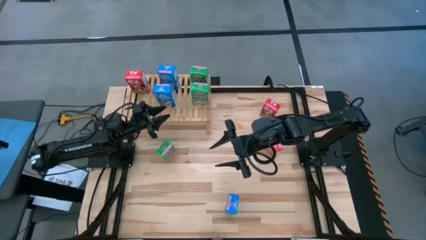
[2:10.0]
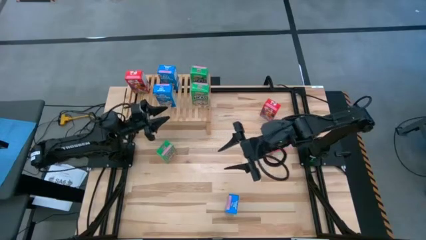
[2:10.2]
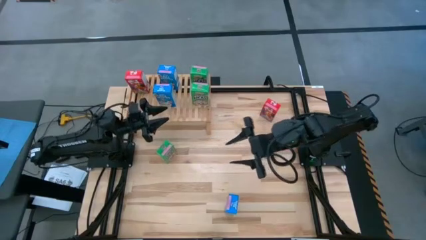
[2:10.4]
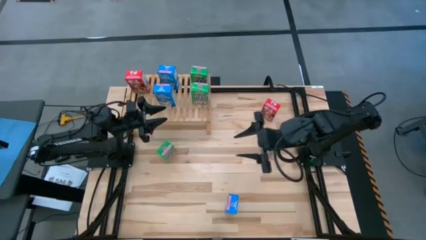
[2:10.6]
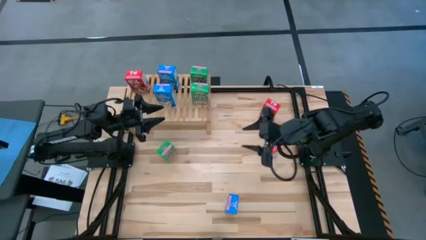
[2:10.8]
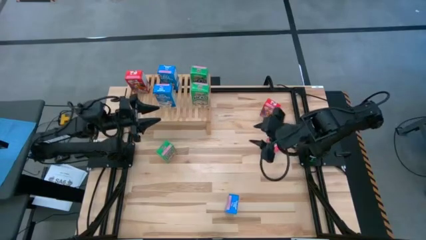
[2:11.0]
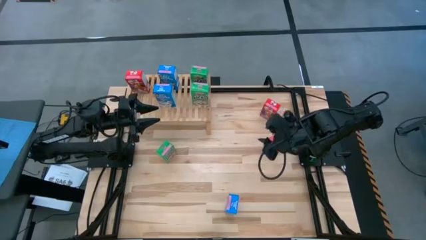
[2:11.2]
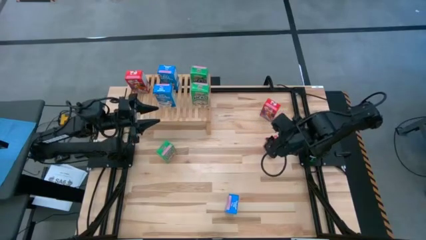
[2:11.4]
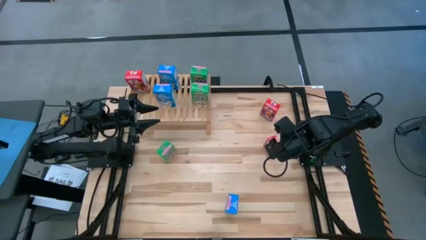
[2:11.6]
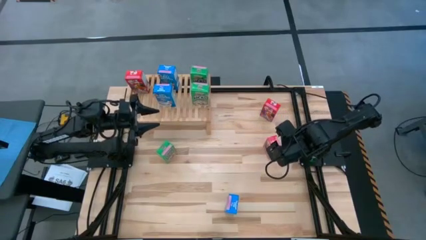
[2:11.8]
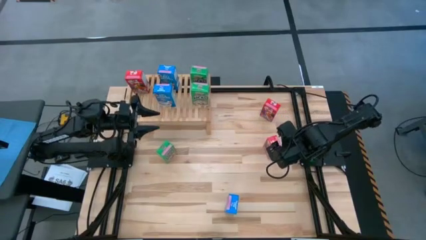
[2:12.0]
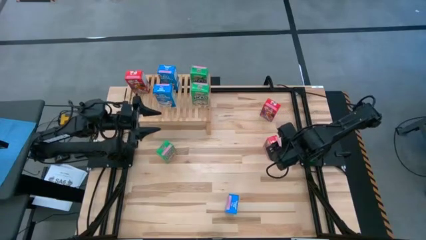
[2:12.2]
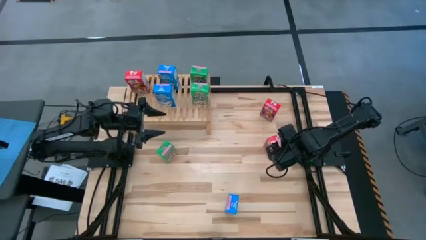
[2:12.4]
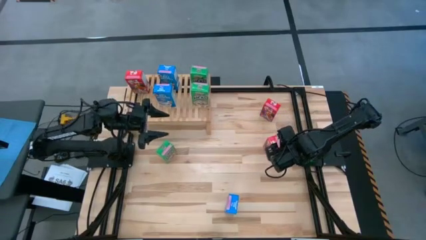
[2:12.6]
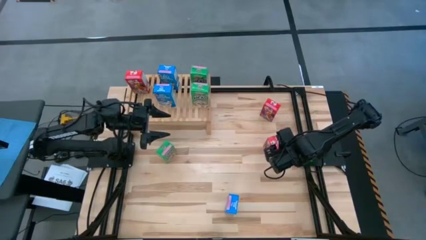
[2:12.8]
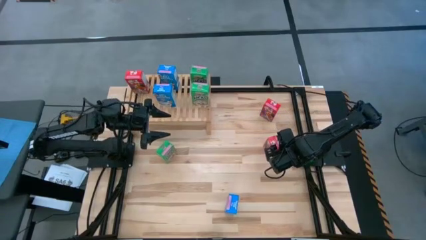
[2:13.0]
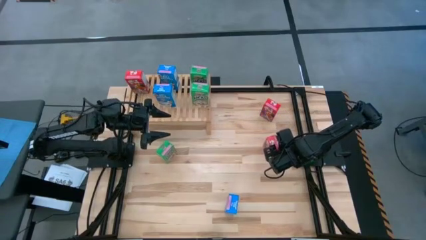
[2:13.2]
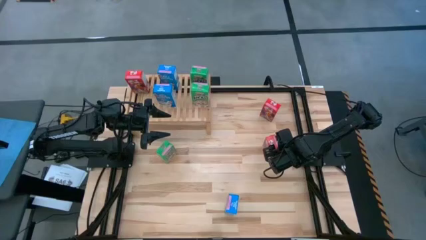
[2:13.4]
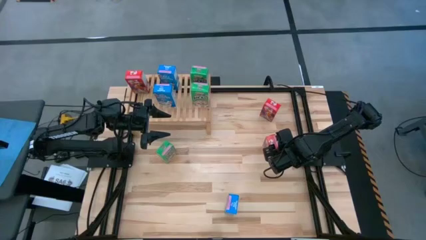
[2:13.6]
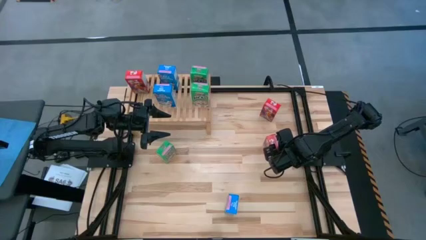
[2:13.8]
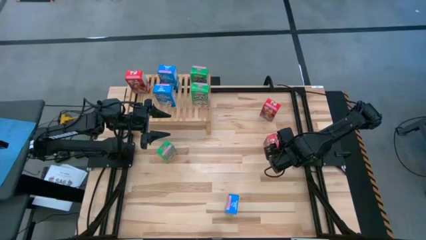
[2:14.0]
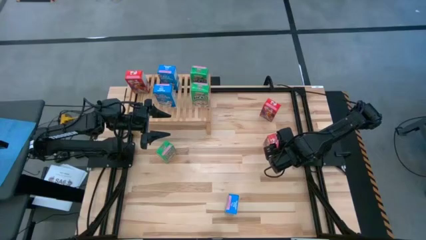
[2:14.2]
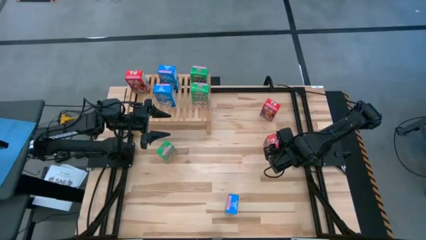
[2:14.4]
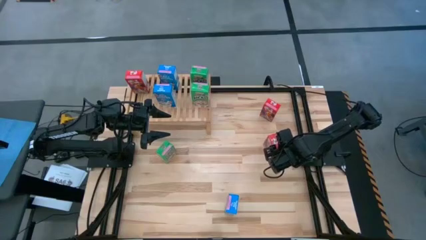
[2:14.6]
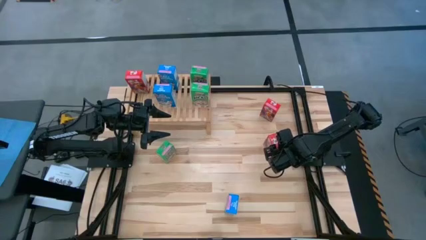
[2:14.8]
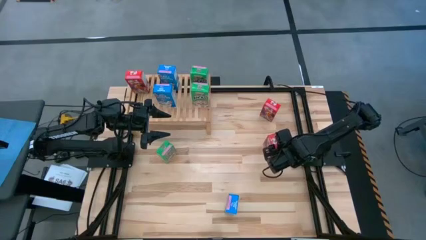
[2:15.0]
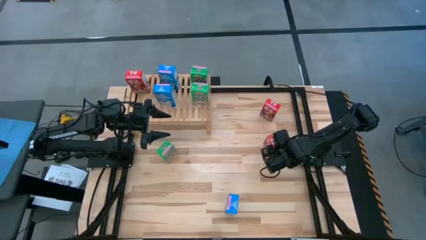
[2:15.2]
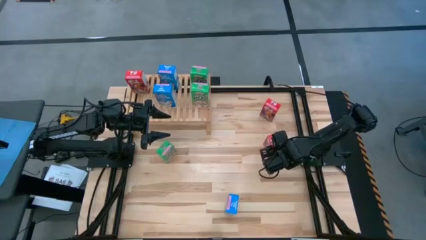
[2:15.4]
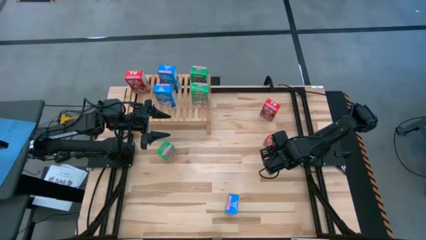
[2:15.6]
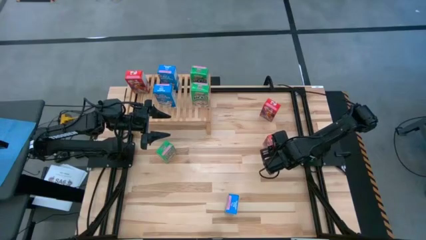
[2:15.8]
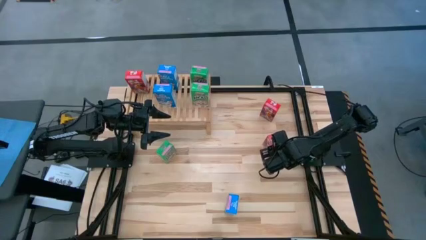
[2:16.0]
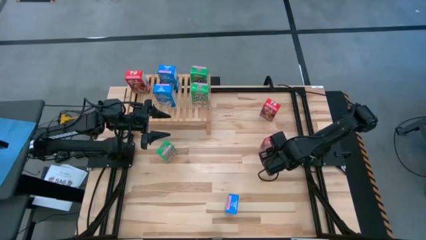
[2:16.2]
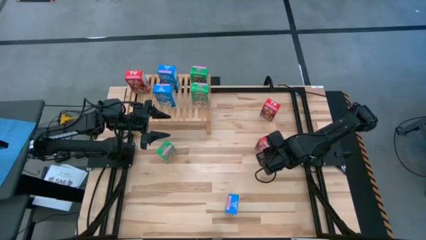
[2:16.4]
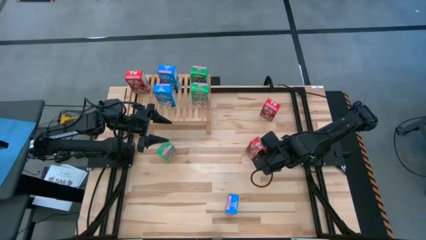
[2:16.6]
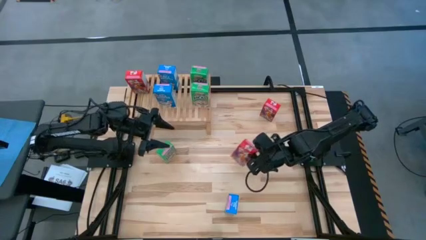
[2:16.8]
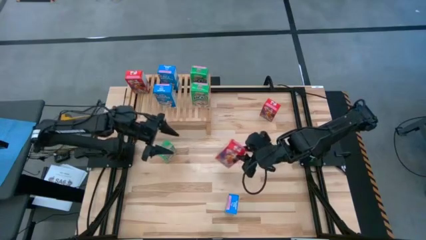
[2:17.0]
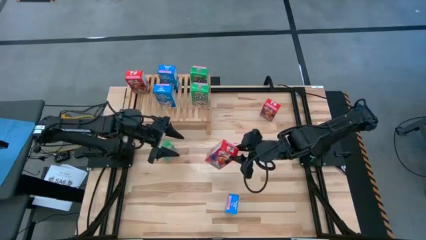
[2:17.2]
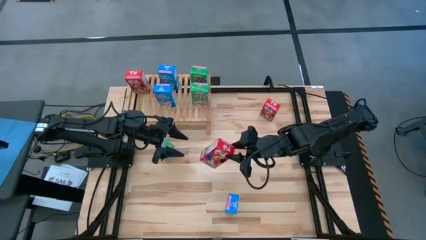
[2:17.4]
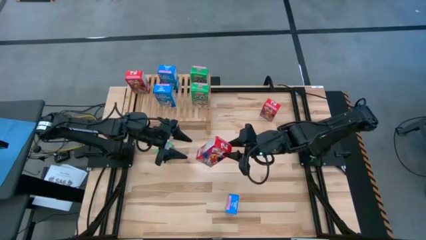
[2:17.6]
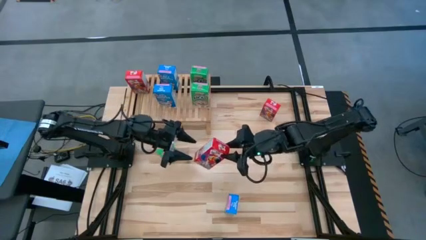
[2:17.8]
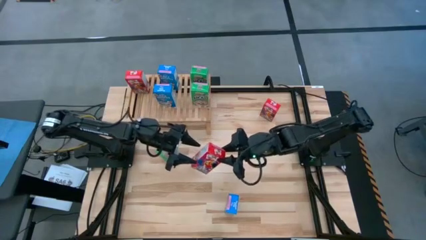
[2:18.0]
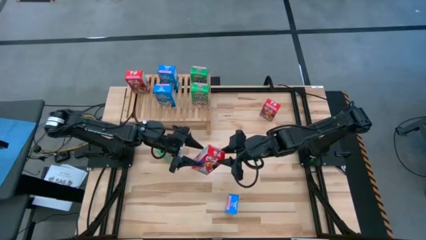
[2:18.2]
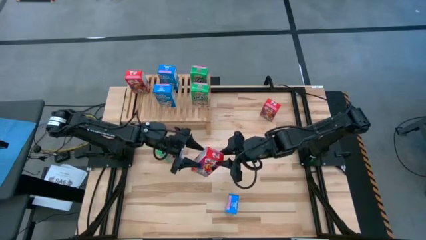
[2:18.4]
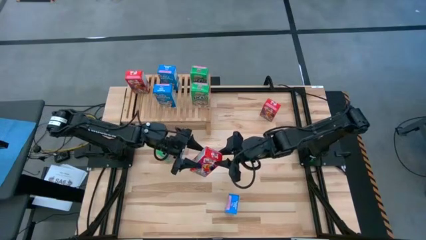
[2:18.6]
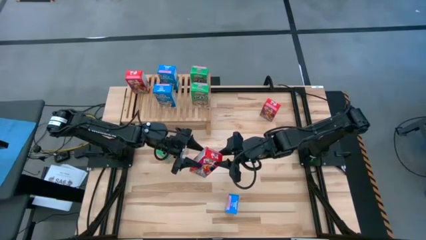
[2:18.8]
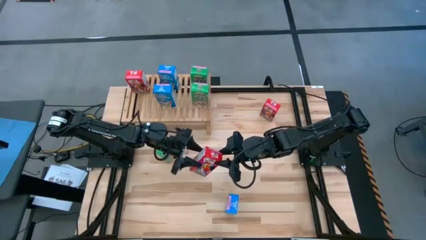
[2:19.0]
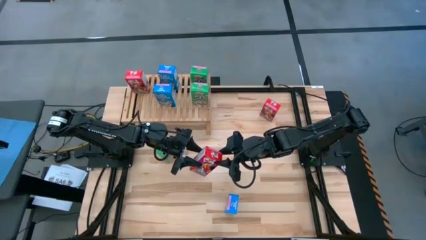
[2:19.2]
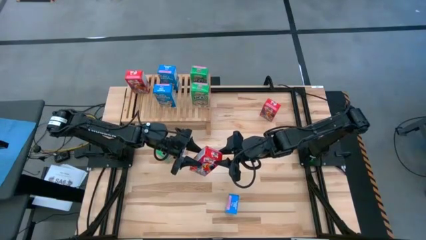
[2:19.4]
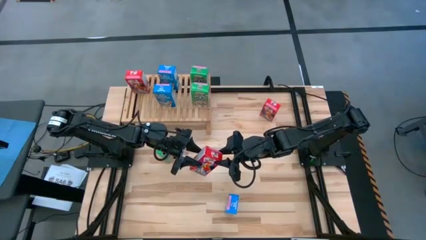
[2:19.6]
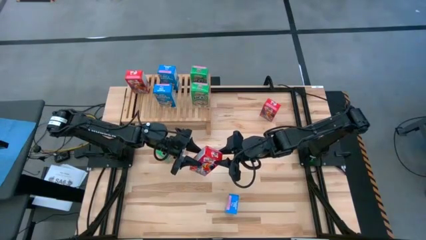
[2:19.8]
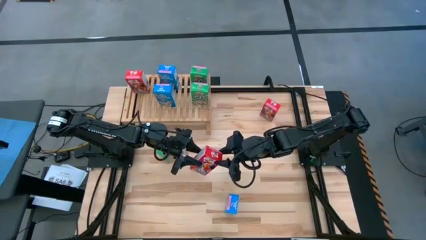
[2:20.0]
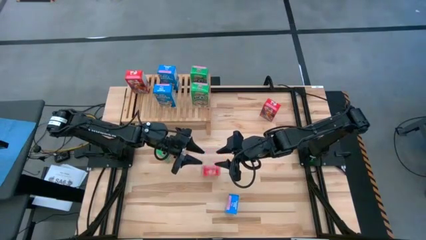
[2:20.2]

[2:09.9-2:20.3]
Task: Stack cereal on shelf
Put the bottom red cereal box on the shelf aligned with the red cereal box

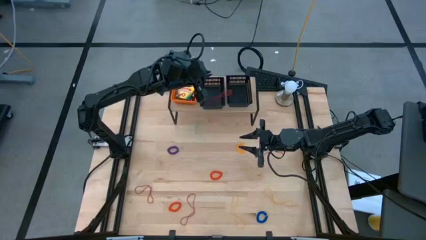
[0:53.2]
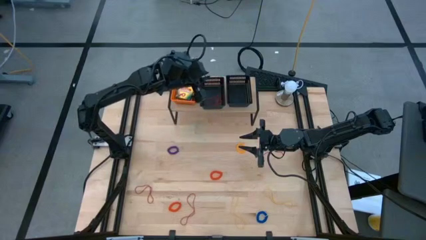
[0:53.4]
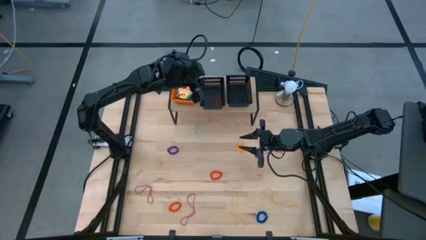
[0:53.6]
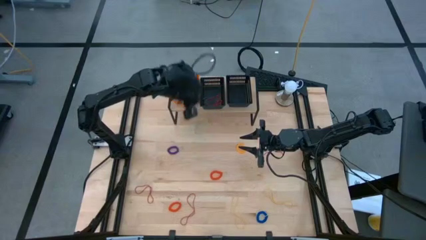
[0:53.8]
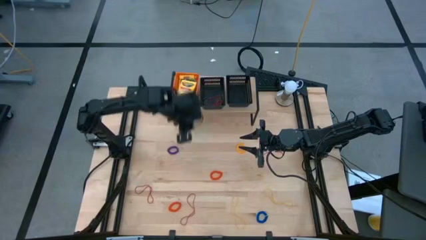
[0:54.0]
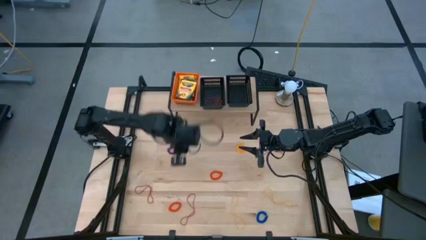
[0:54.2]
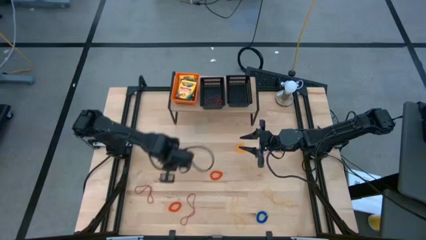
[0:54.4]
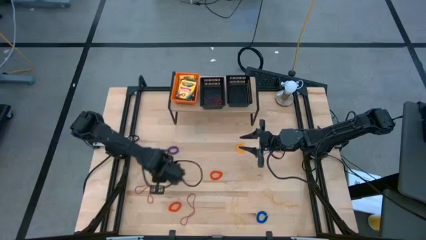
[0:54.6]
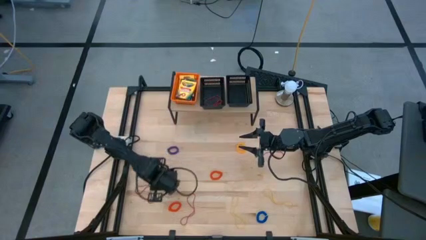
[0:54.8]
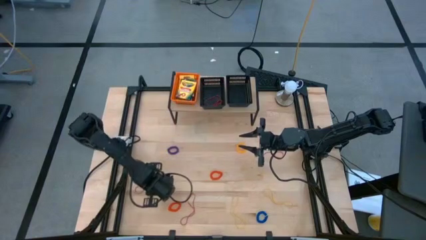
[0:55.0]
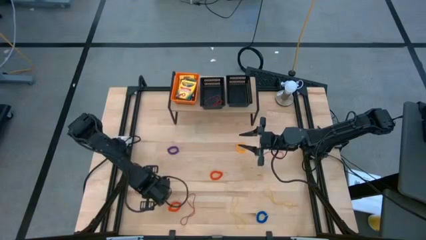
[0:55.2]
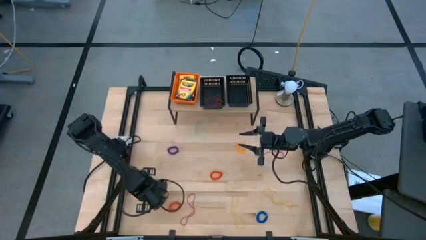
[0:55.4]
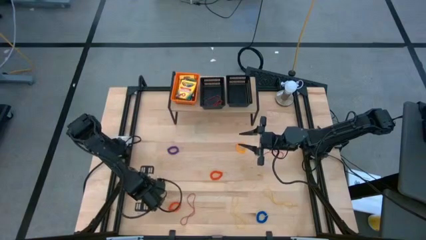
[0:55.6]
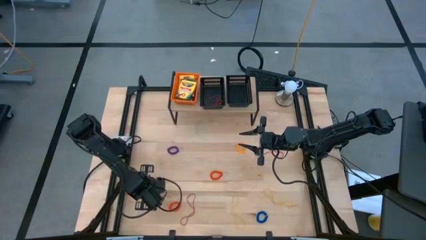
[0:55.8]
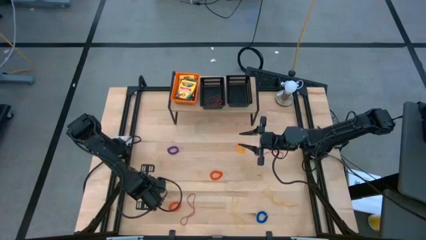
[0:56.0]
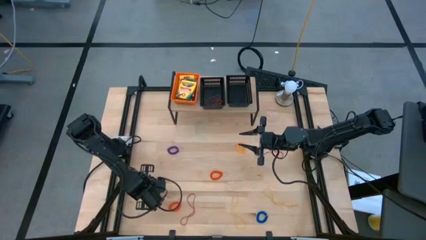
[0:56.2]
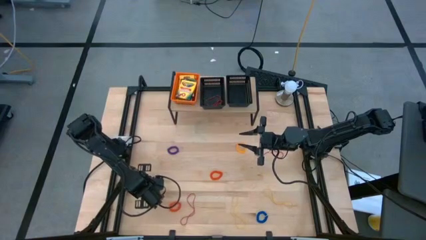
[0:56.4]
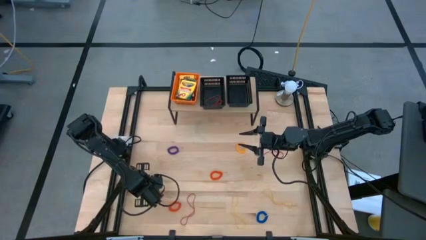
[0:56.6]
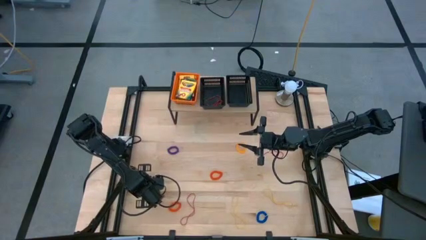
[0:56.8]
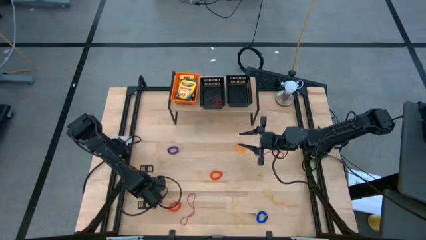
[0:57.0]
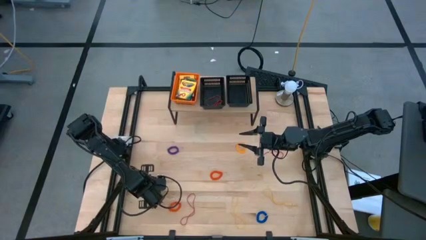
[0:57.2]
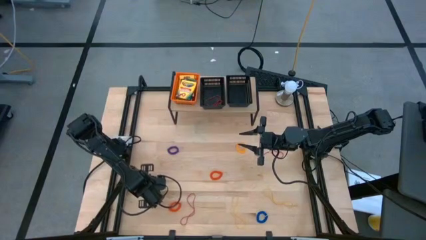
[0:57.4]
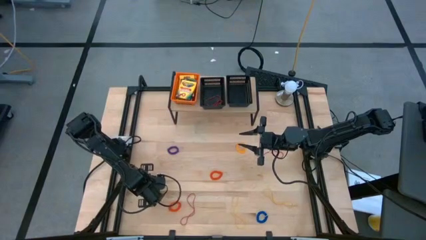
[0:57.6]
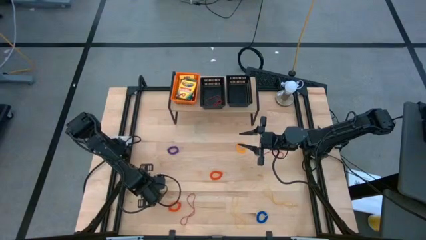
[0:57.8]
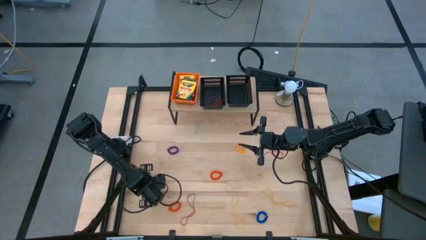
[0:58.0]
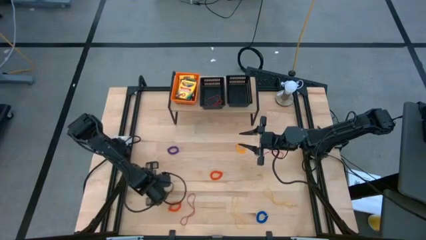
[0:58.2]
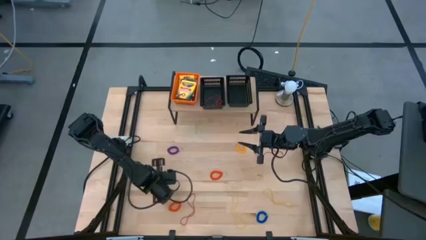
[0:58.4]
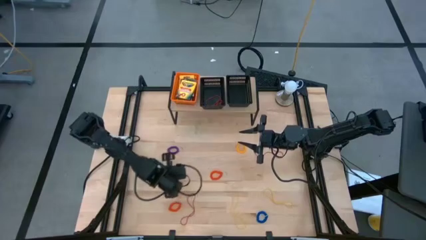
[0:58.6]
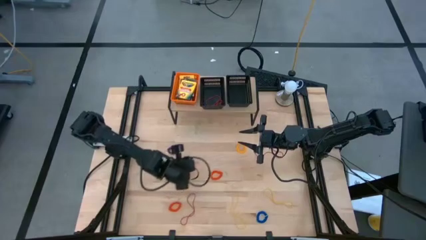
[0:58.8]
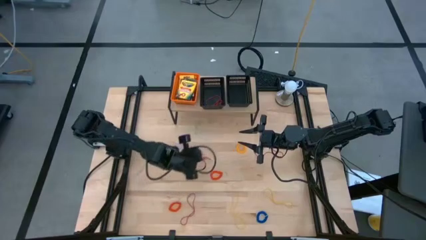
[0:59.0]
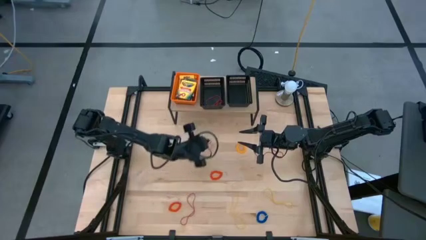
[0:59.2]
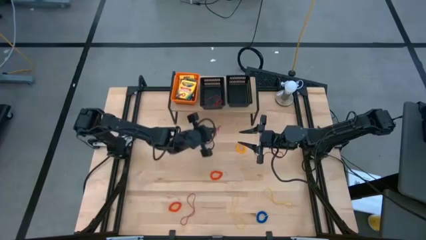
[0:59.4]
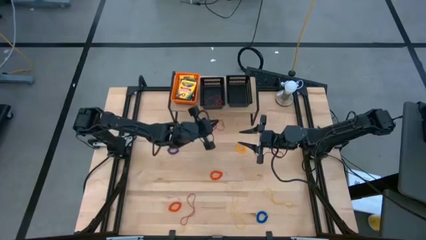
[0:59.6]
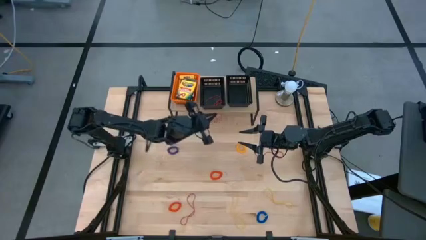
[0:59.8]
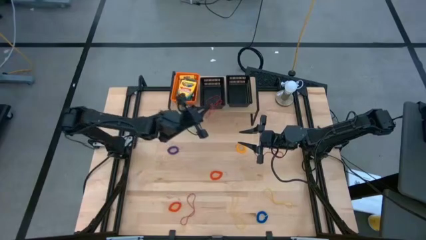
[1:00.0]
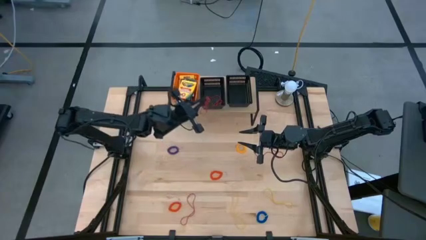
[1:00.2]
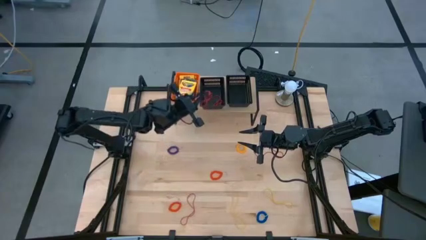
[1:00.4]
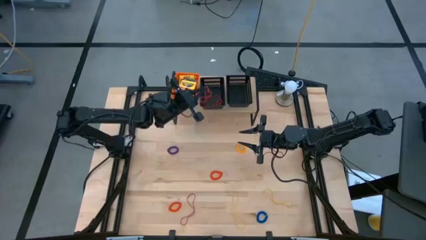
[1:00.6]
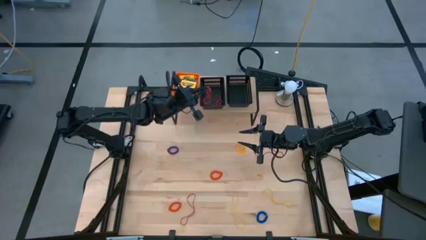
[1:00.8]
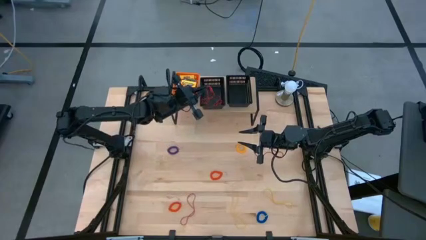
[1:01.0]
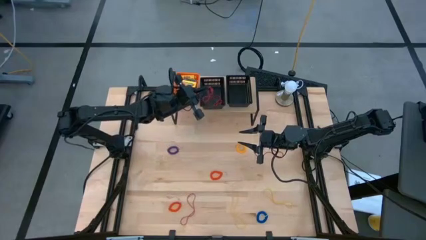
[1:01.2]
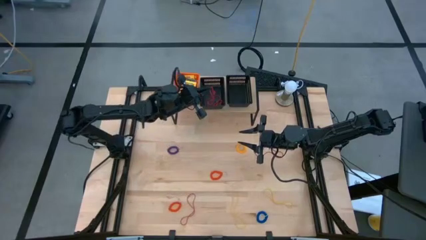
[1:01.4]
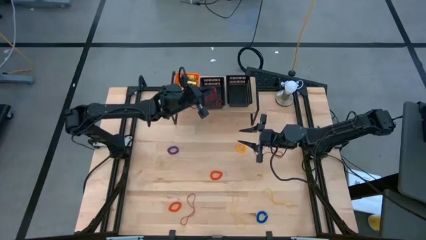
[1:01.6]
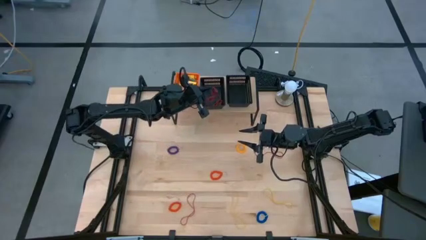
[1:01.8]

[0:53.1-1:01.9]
Task: Pick & Place Office Desk Supplies
Put the red rubber band into the left black basket on the shelf
